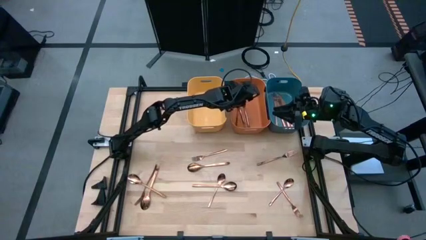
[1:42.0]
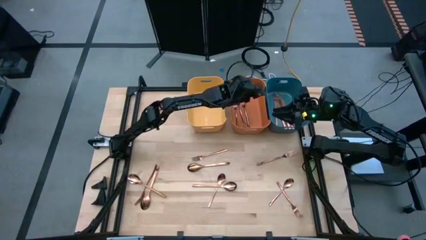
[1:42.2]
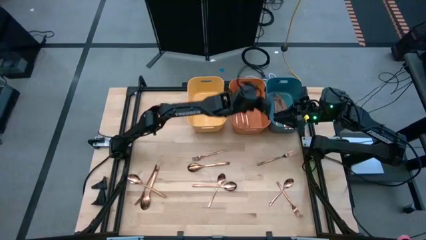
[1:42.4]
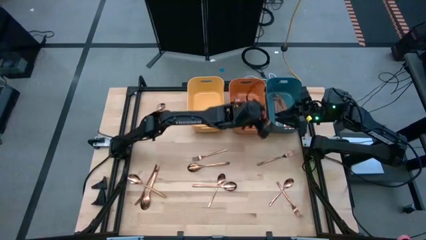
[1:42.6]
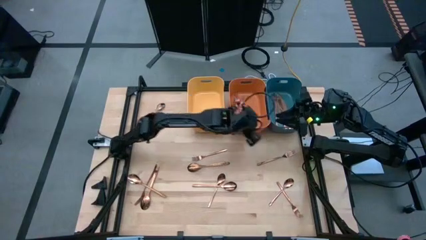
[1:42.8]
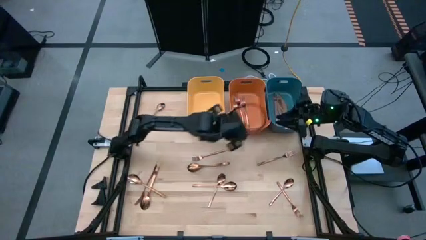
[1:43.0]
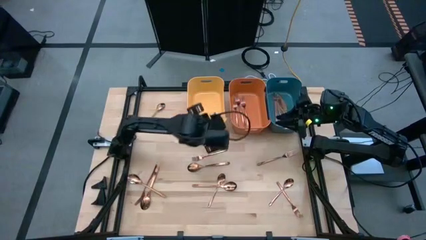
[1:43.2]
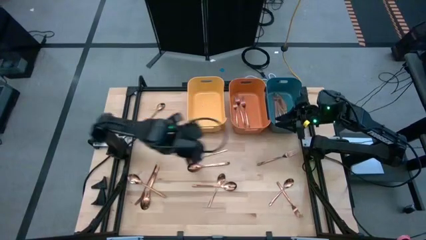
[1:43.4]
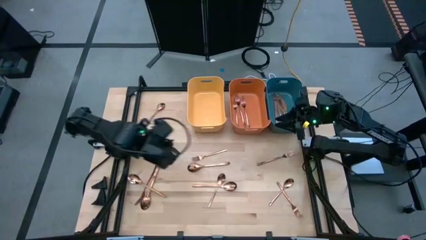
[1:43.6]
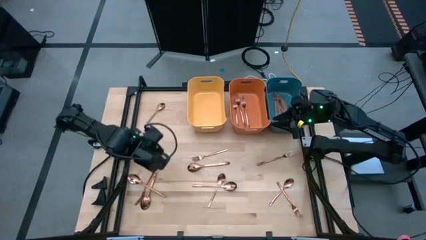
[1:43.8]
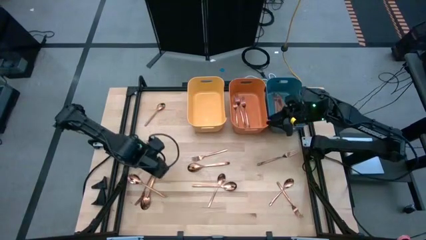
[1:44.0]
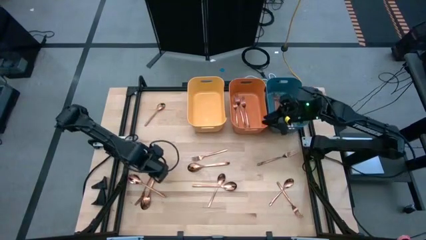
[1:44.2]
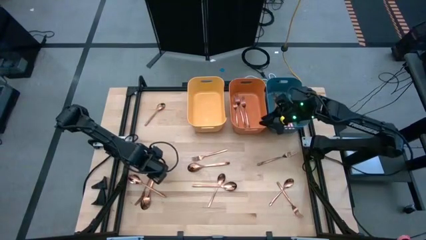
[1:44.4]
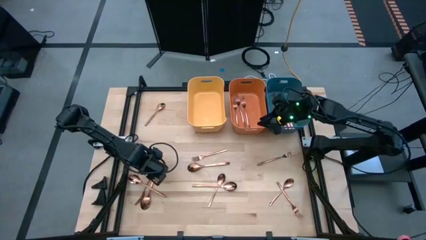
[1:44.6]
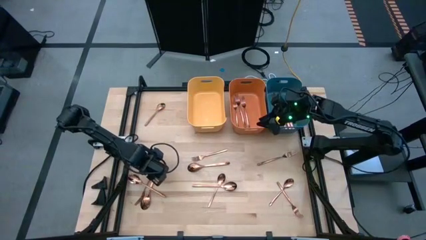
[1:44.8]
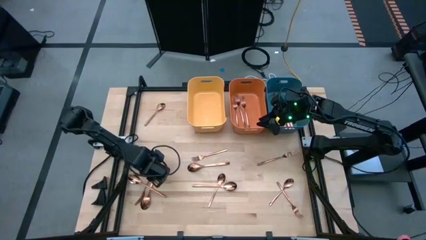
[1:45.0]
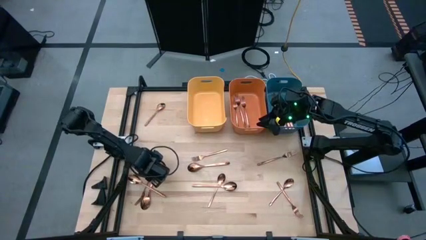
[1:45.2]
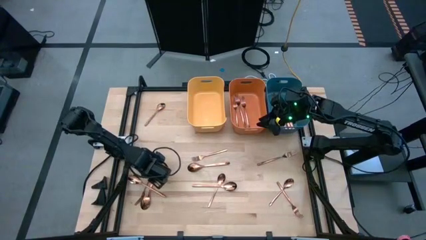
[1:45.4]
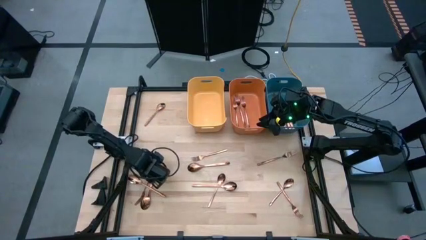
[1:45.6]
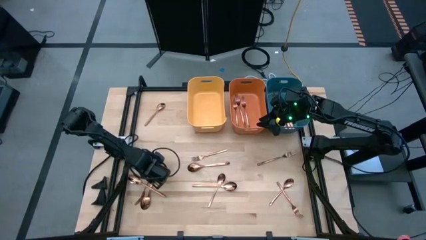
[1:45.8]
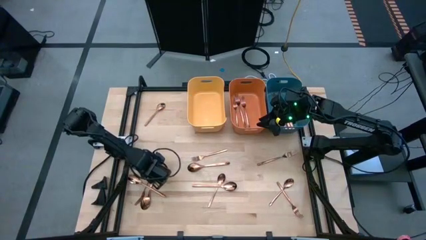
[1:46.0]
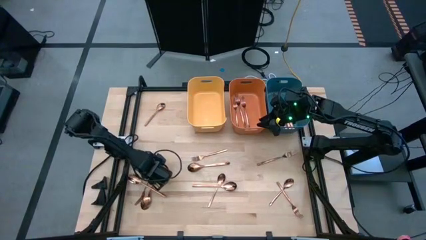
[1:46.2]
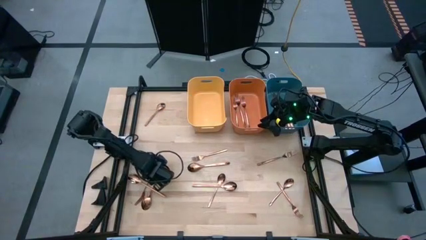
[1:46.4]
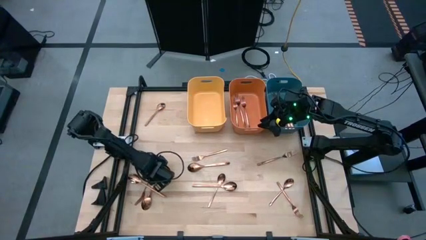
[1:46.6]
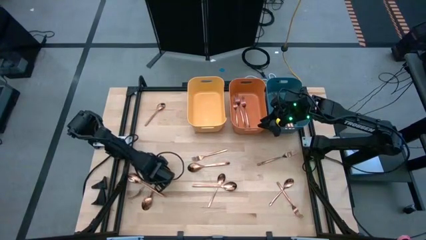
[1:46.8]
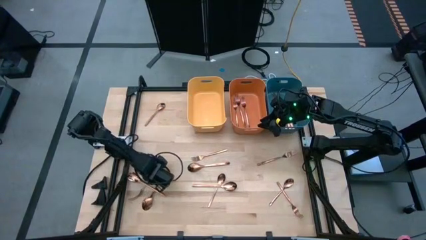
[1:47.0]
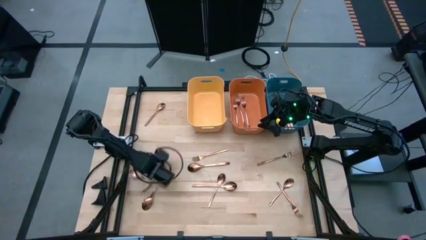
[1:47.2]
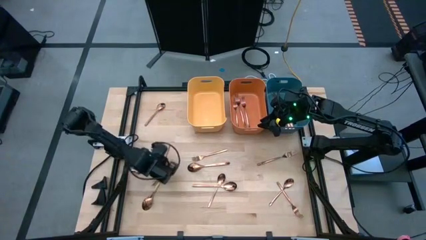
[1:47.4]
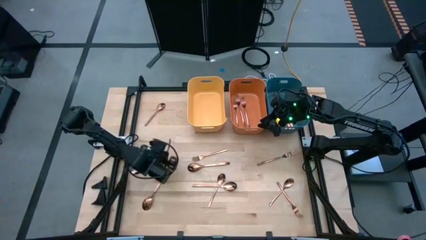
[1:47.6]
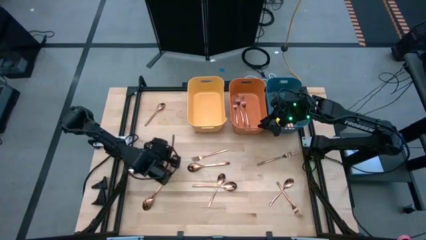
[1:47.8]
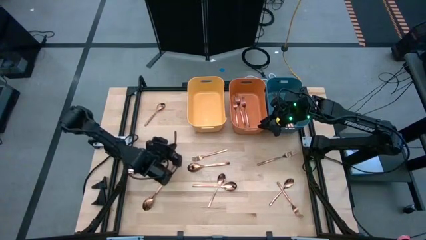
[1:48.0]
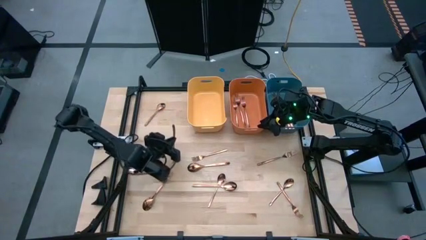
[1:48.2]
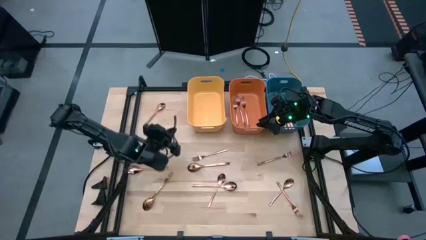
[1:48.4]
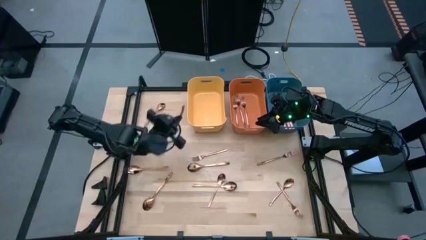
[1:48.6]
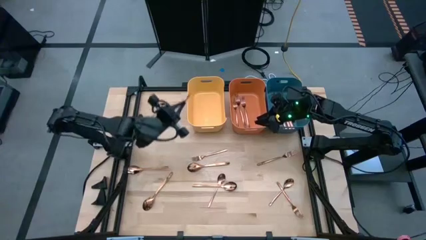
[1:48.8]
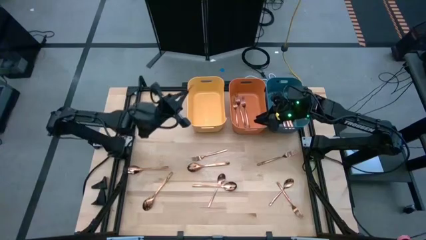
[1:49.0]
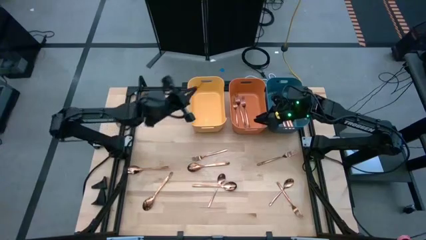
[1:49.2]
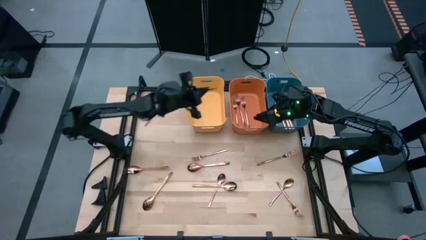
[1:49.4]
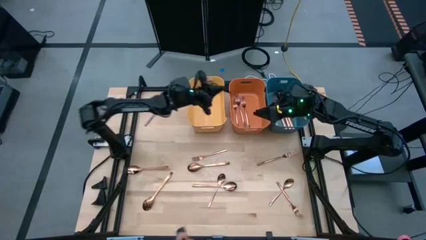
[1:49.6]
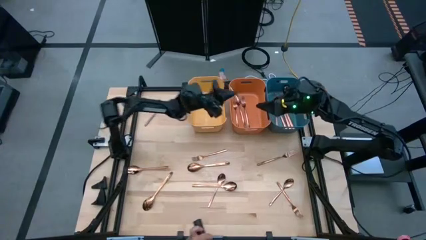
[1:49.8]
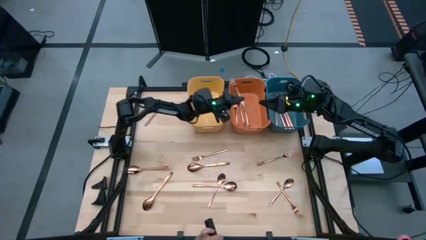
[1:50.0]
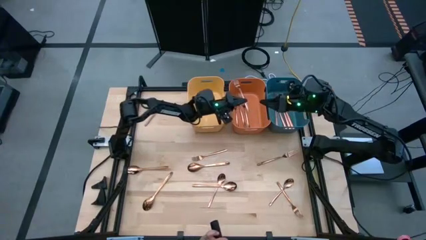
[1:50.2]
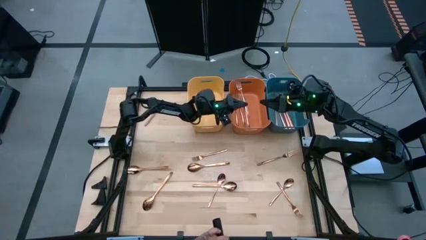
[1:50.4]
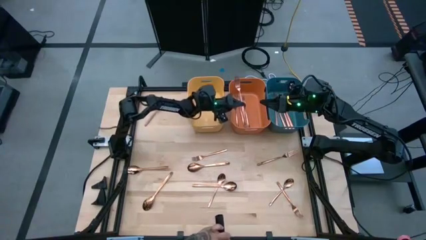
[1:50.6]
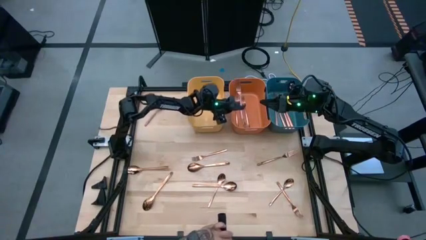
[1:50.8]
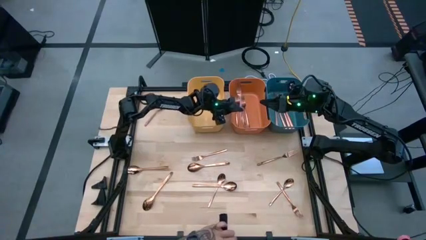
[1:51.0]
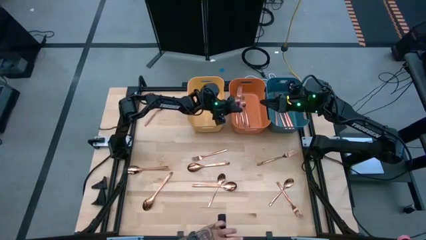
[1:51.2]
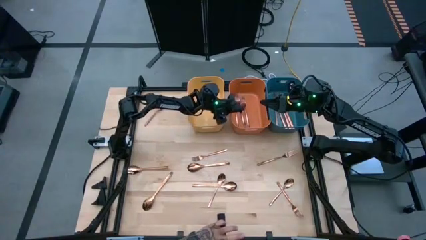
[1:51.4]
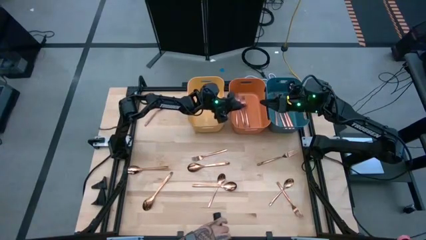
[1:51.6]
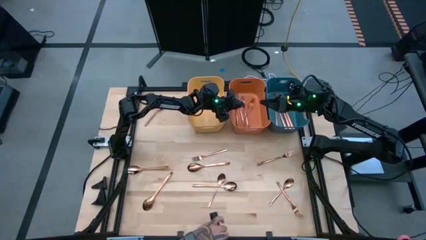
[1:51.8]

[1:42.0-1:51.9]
Task: Sort silverware
Put the copper fork into the orange bin

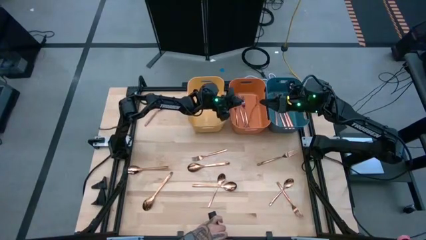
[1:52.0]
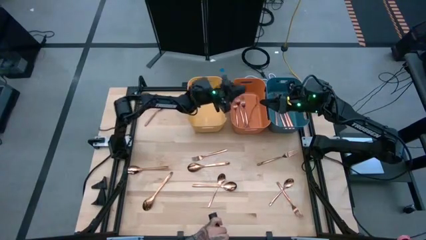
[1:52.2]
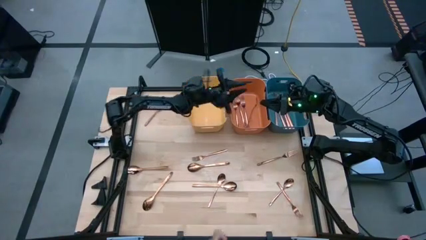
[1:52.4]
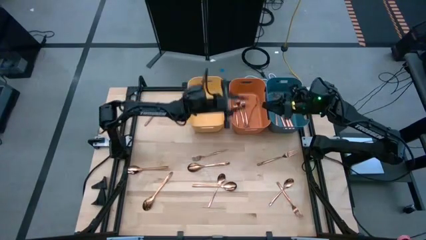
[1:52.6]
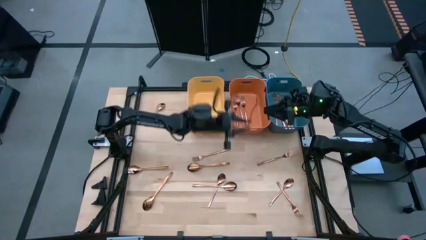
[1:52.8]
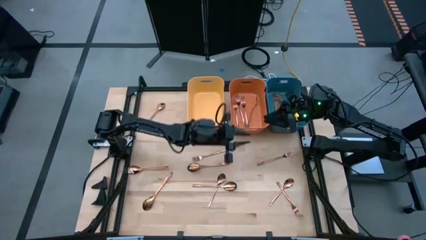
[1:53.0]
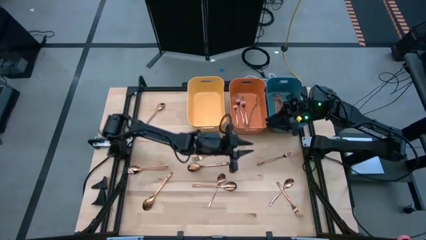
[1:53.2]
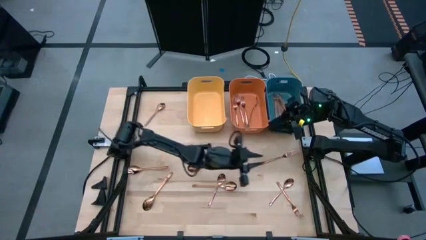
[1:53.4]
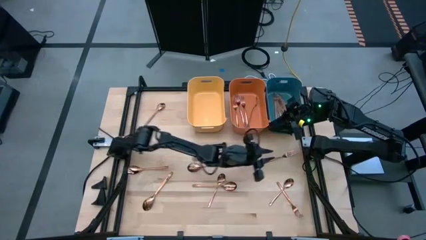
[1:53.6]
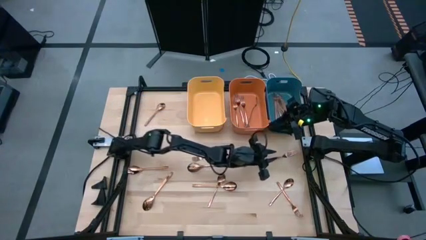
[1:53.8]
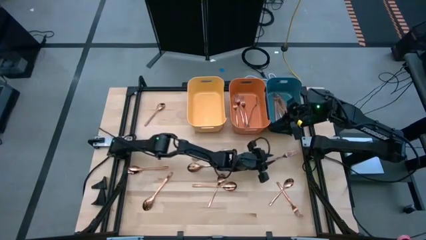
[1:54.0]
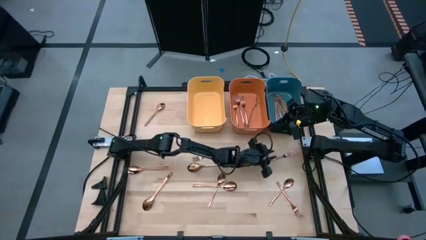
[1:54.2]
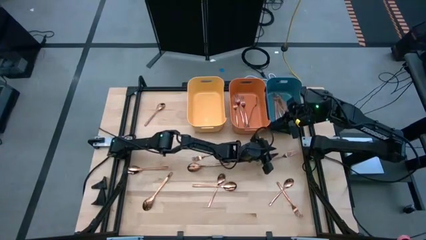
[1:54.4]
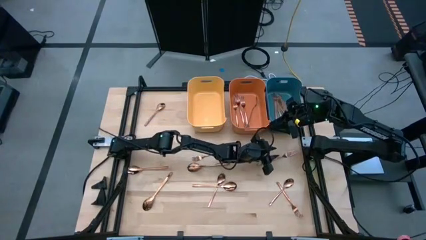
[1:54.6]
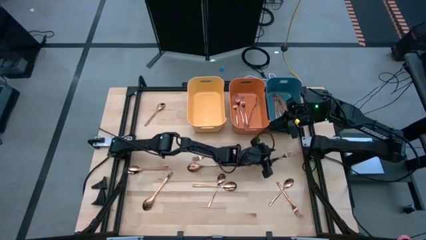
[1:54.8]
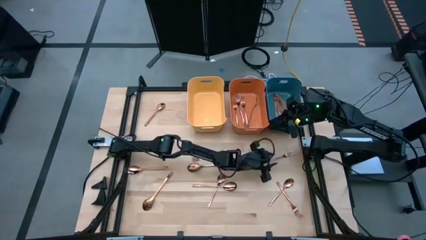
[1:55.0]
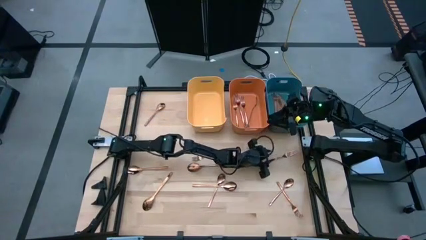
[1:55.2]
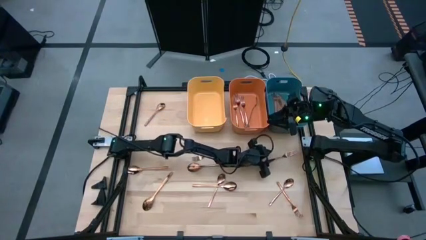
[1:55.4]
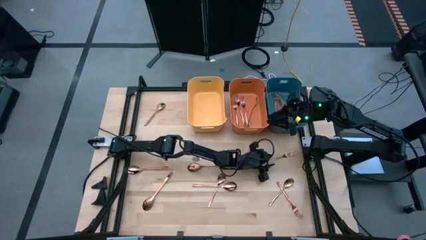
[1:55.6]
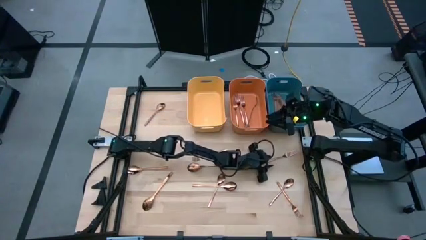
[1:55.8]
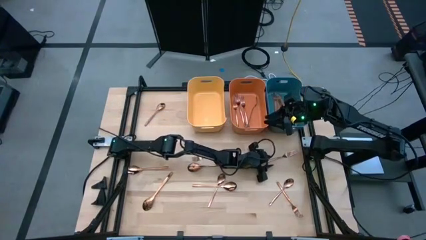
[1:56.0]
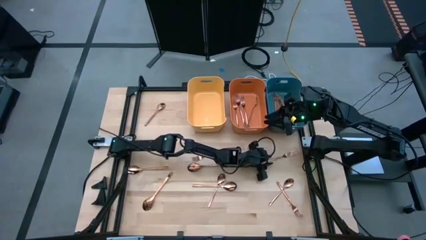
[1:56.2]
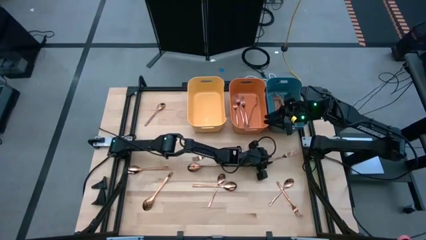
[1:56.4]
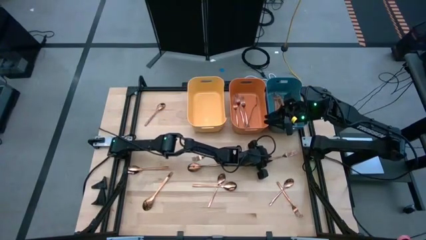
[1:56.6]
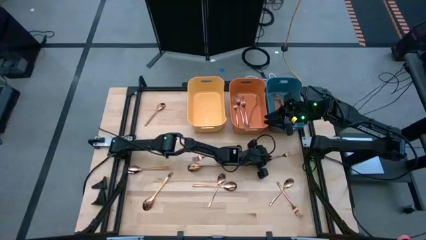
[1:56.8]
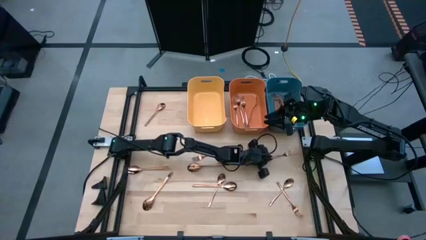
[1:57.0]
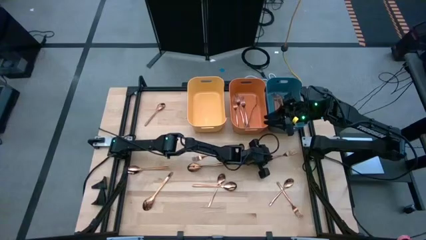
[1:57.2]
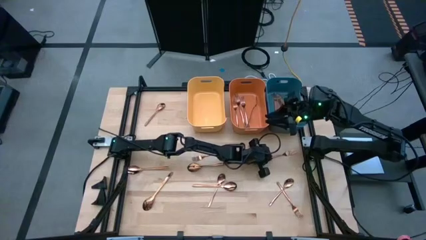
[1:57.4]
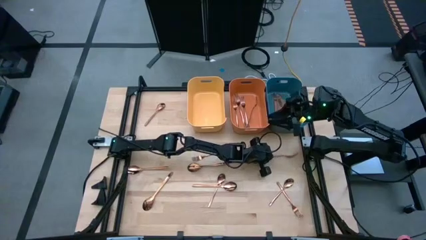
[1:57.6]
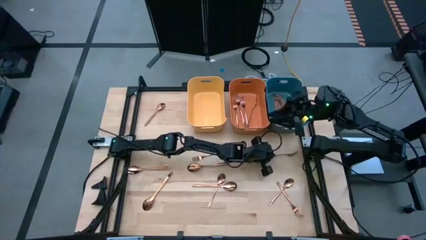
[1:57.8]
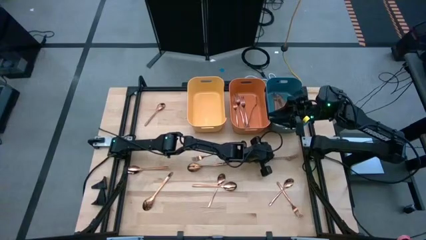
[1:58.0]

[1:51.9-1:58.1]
Put the copper fork into the orange bin
